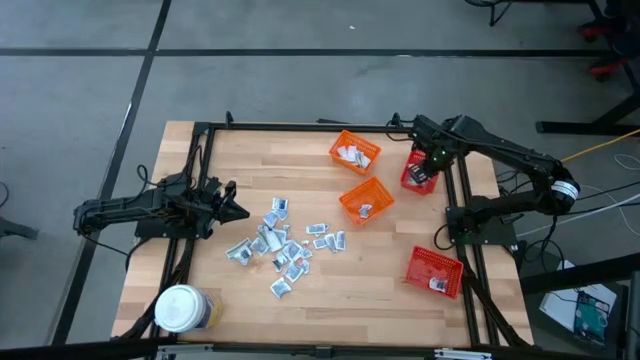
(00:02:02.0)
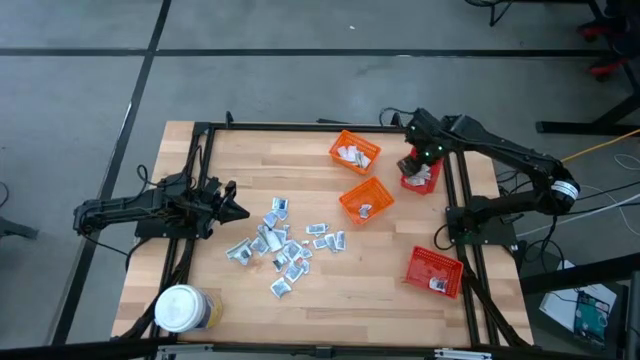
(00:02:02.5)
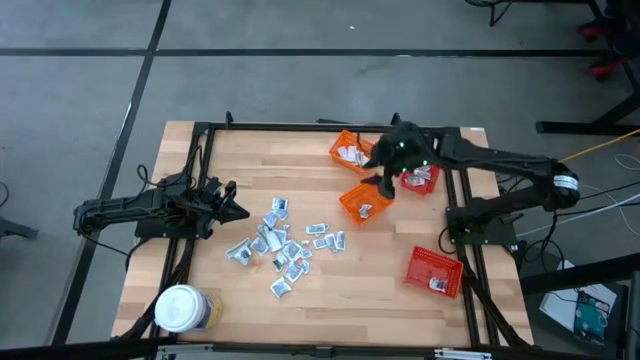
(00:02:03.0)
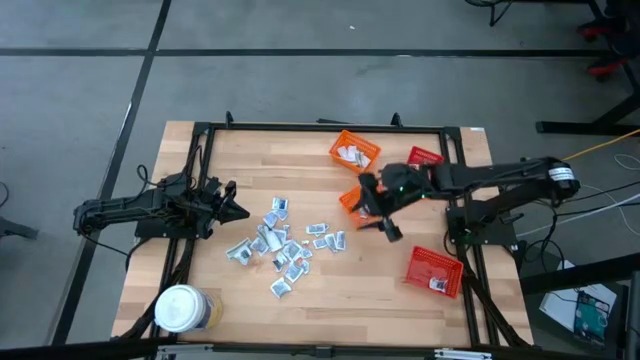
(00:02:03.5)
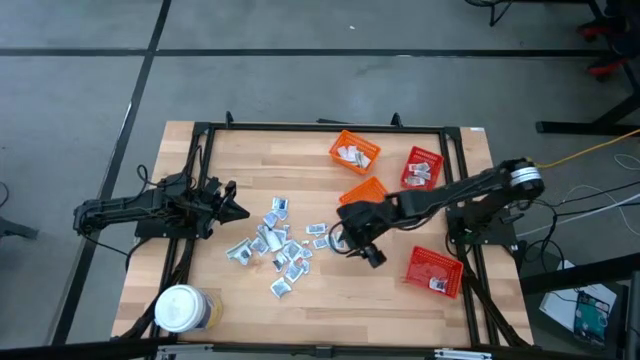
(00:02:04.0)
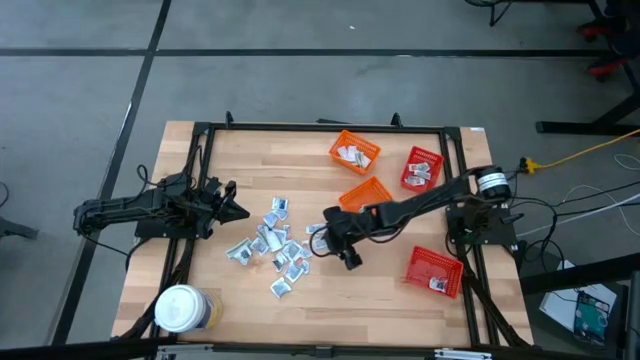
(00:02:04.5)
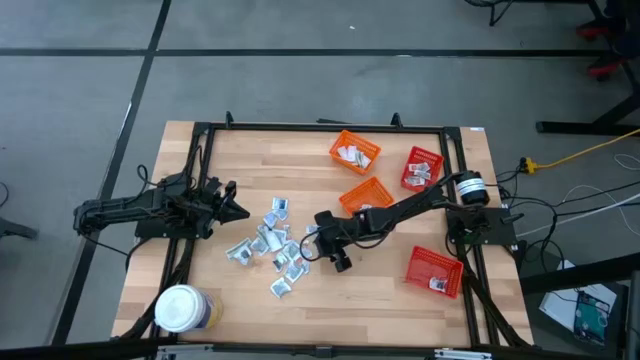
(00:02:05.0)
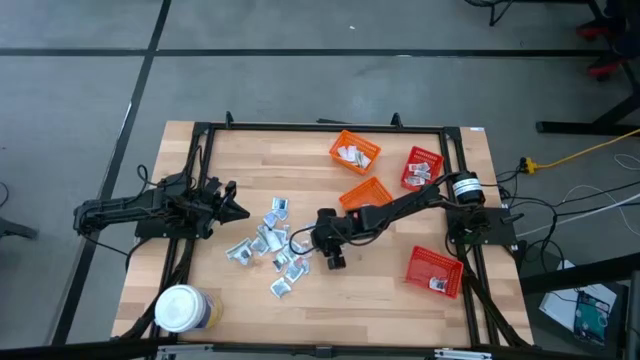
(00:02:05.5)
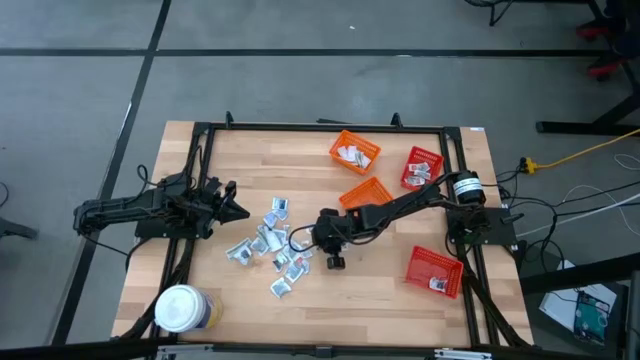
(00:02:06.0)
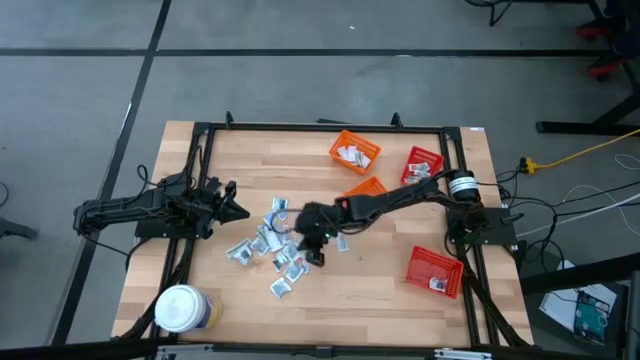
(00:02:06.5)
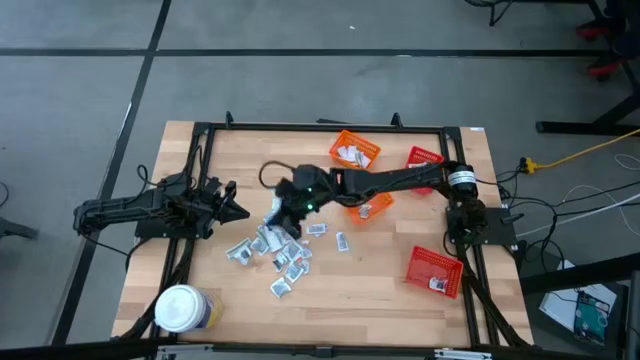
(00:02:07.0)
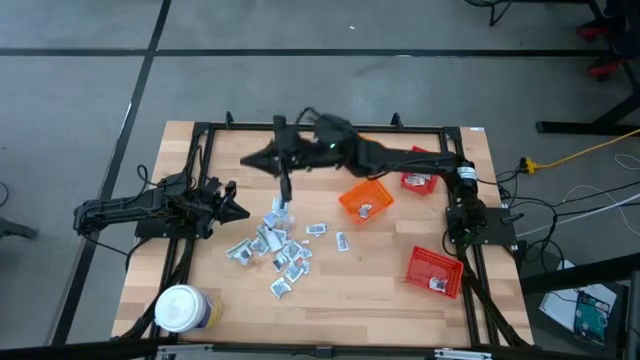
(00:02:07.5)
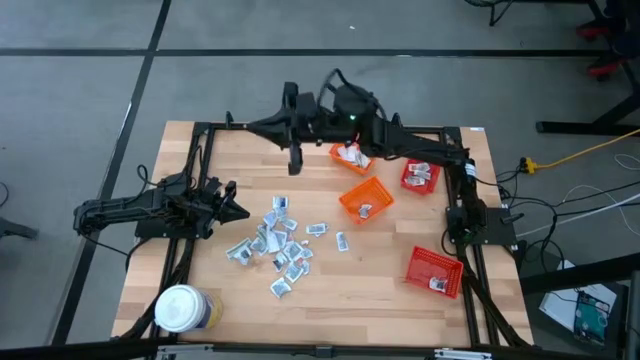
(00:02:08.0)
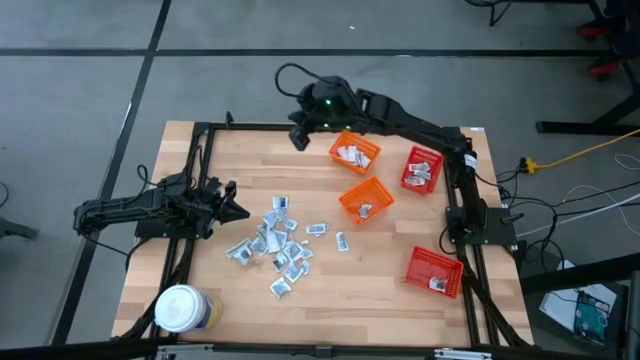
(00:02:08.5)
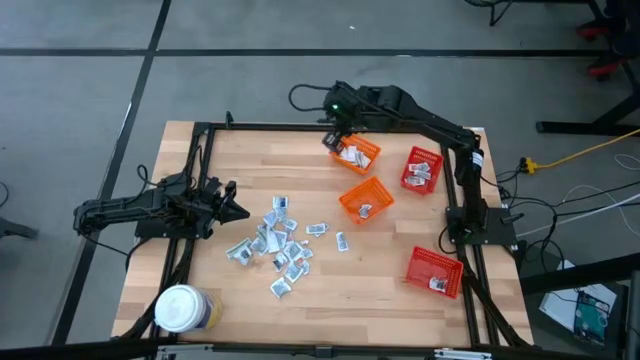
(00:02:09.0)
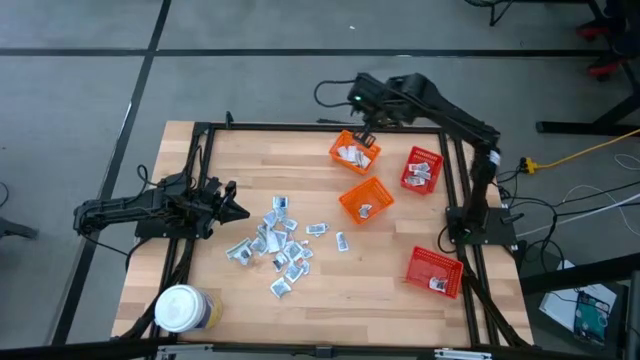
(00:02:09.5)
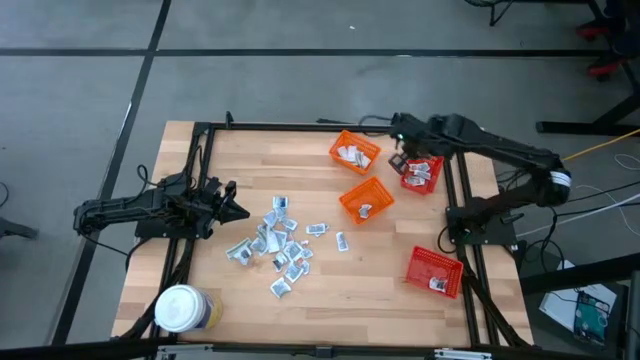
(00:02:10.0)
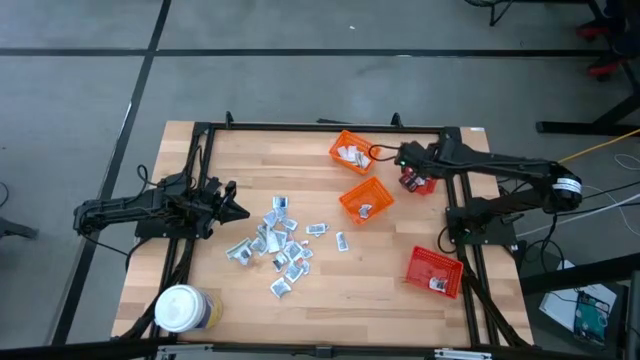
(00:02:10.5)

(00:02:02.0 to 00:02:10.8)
Task: Pick & Place First Aid Supplies
Put the orange ointment pack into the top red bin

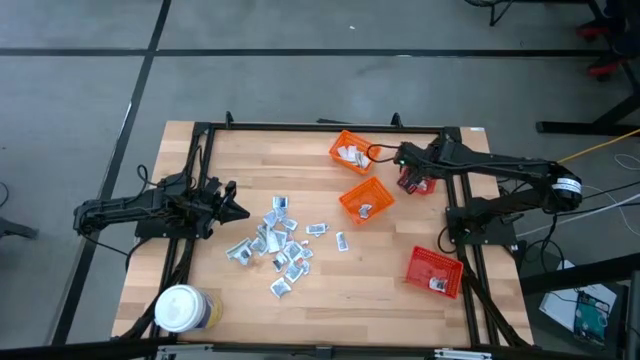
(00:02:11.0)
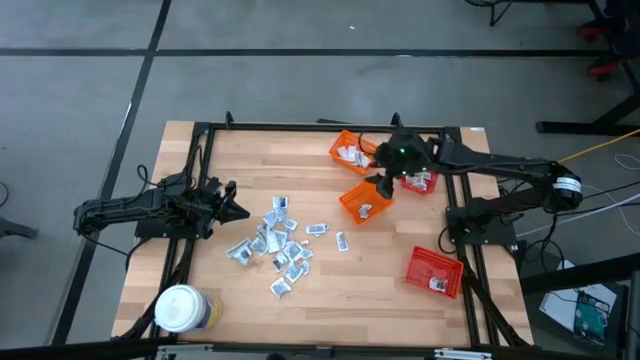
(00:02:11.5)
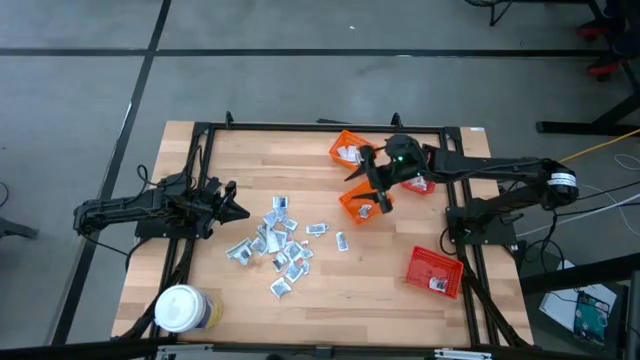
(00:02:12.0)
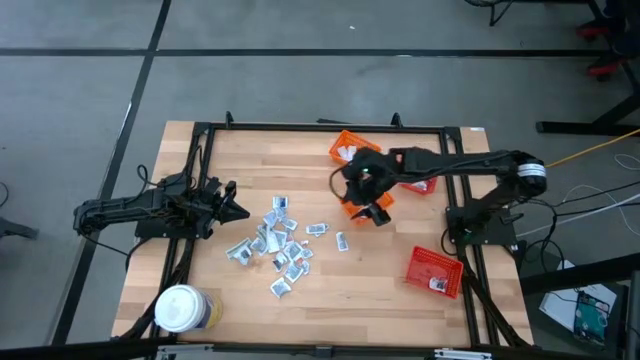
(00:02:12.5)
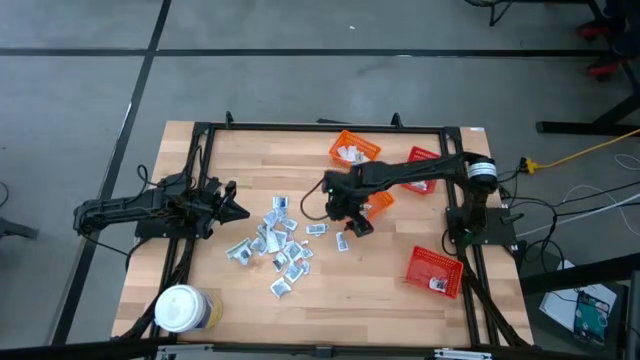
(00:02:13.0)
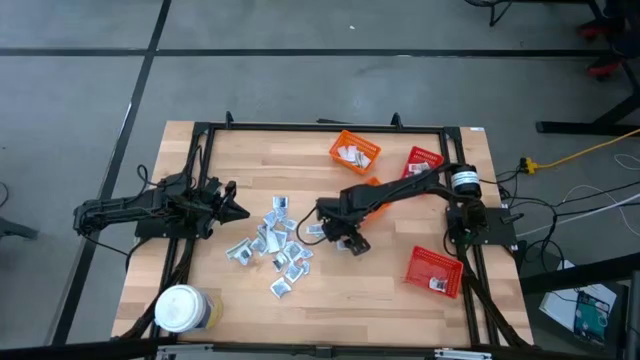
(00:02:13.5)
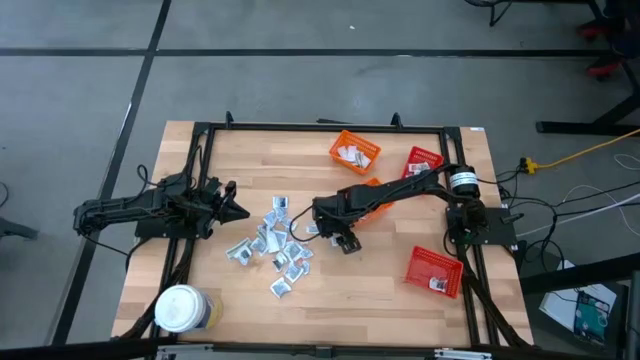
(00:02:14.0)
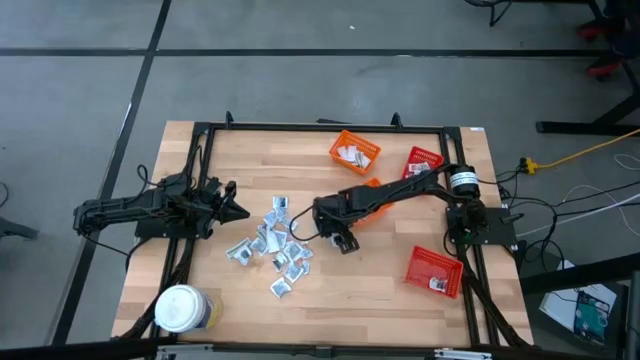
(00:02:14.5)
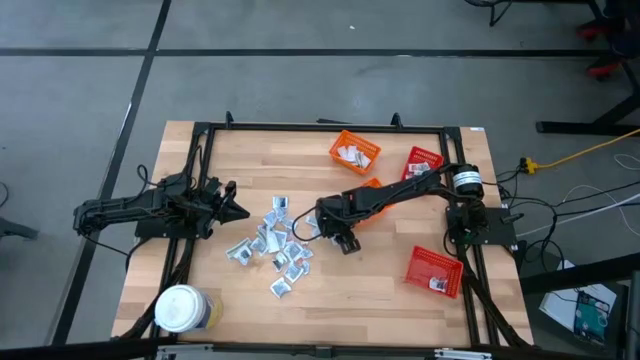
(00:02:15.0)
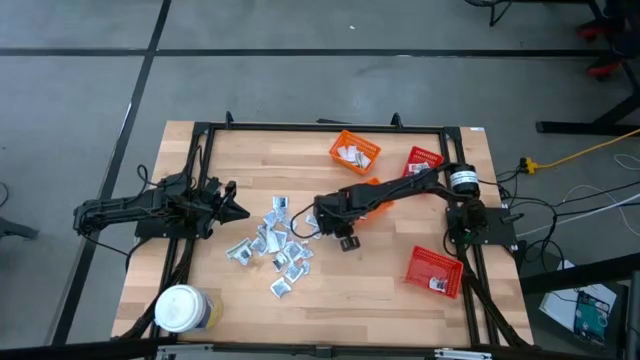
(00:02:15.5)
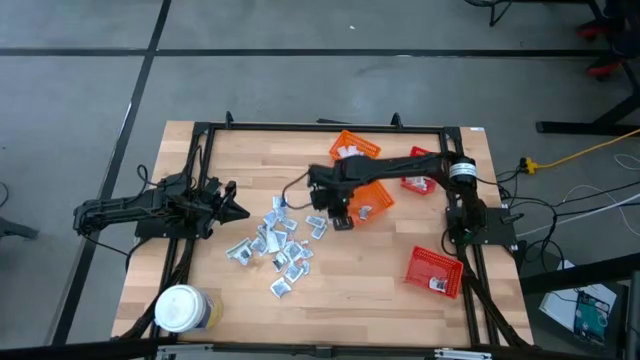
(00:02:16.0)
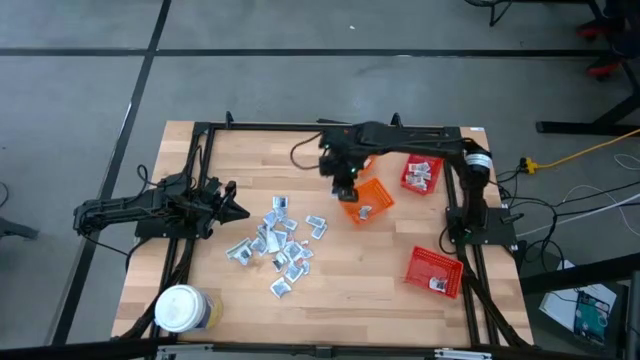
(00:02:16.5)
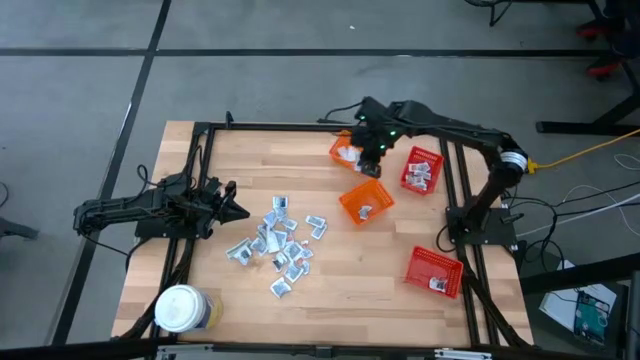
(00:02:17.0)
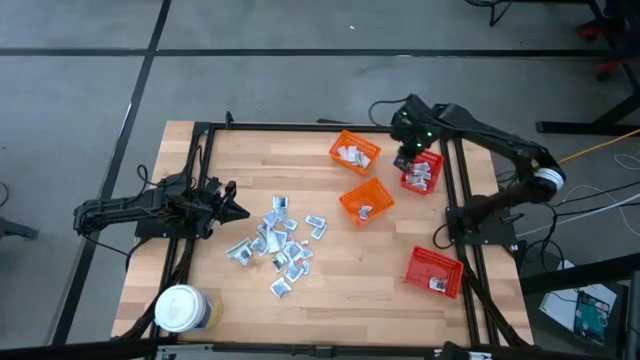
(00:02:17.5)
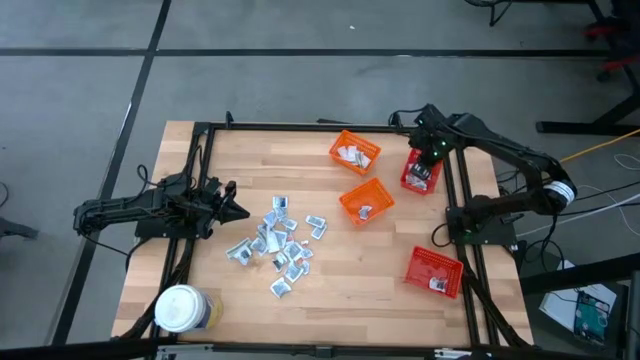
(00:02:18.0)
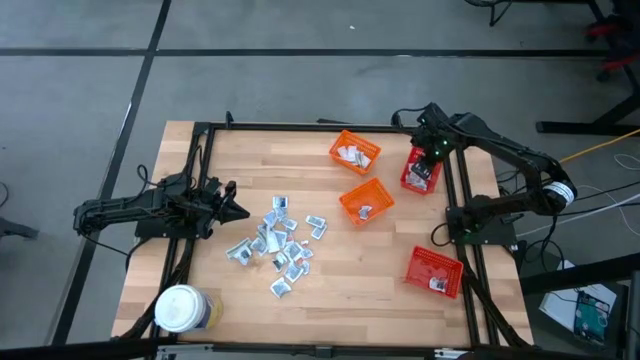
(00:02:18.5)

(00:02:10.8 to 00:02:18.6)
Put the orange ointment pack into the top red bin

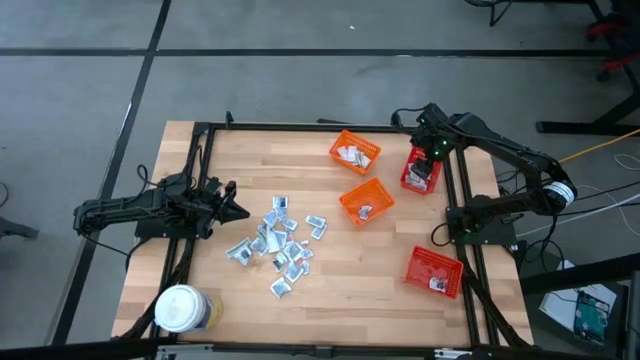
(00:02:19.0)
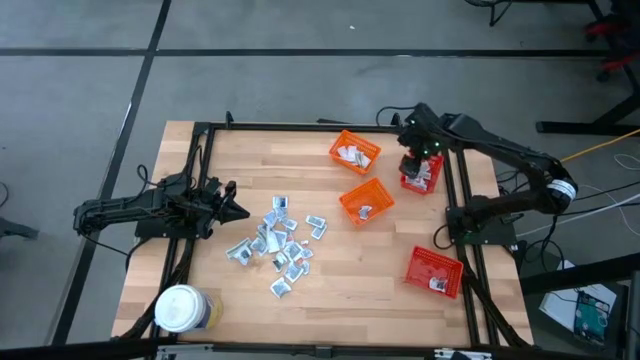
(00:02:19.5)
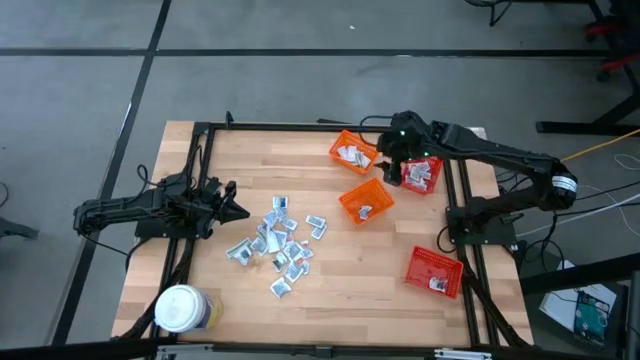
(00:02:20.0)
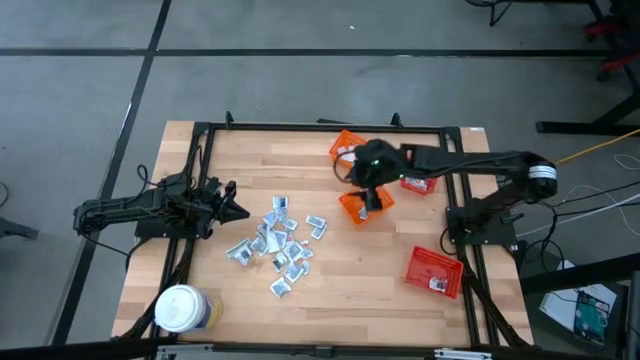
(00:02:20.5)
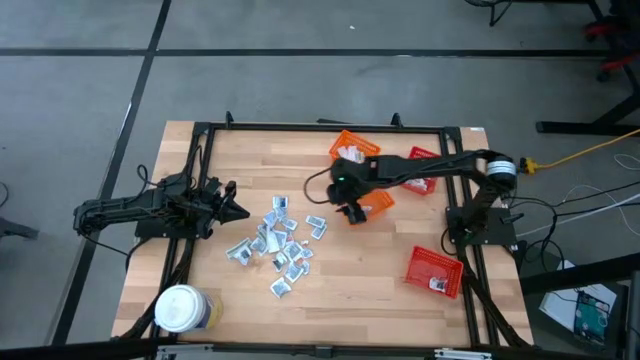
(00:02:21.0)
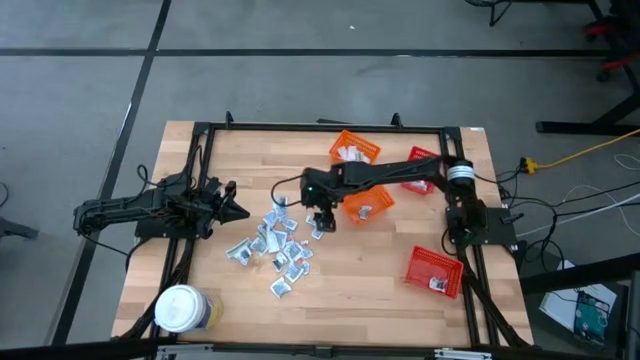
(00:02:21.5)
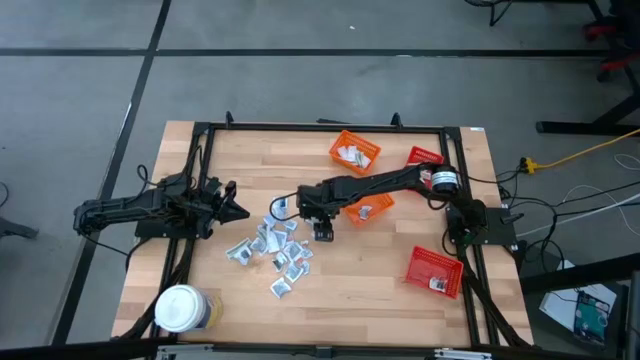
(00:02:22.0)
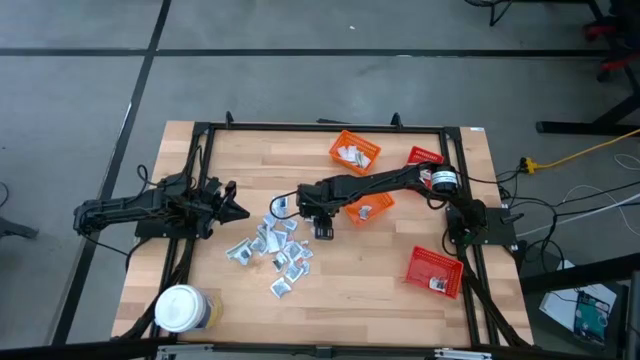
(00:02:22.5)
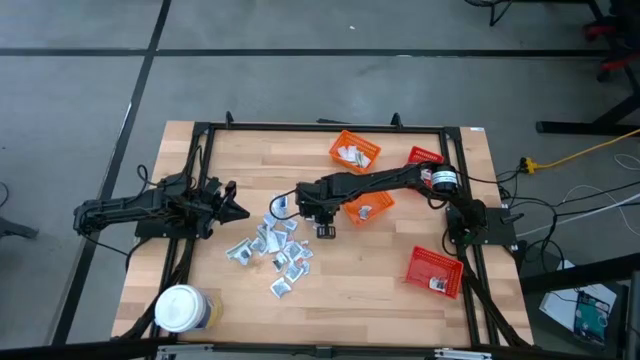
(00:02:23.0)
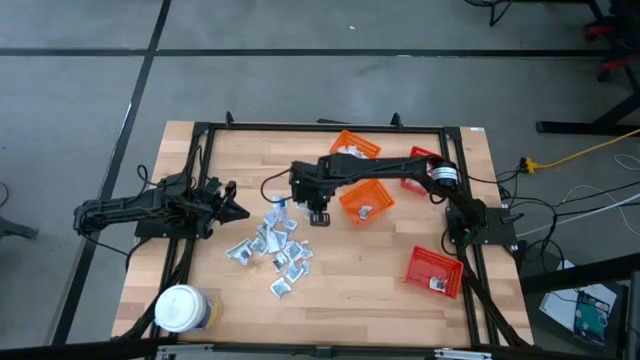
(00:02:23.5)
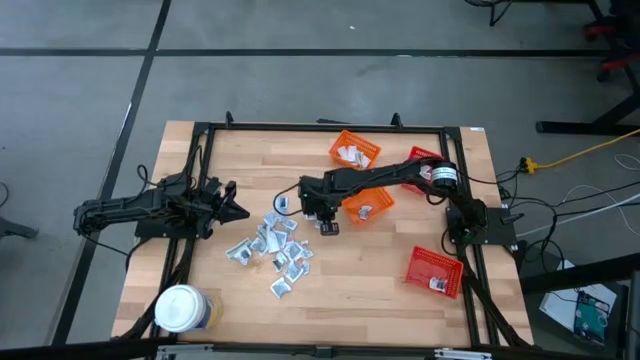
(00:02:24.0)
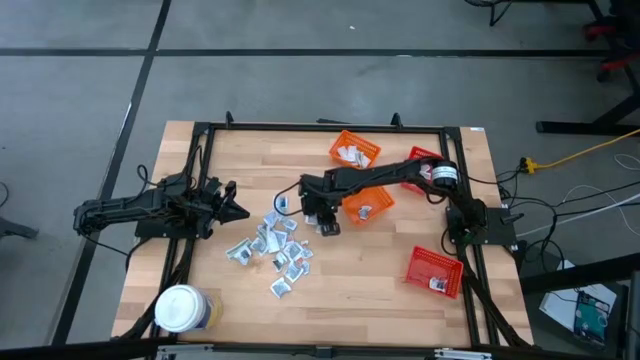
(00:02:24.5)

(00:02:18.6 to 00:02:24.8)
Put the orange ointment pack into the top red bin
